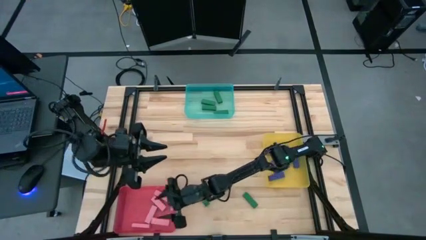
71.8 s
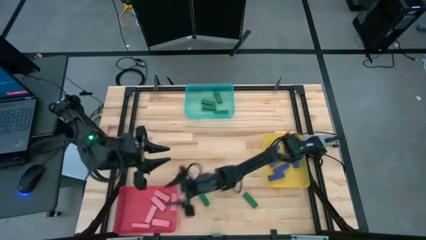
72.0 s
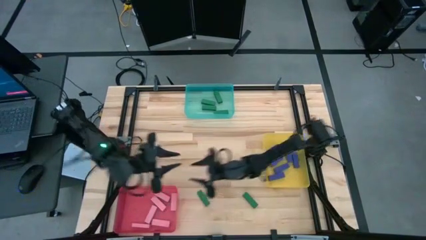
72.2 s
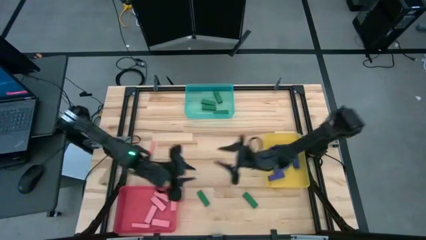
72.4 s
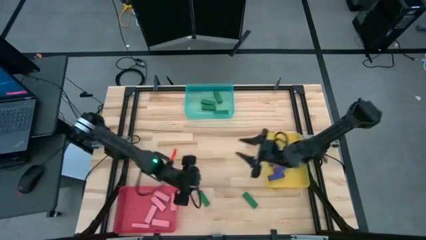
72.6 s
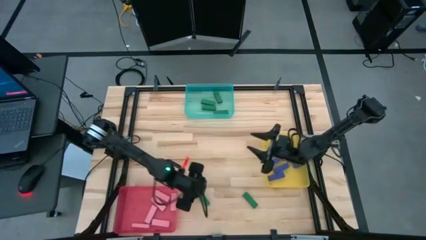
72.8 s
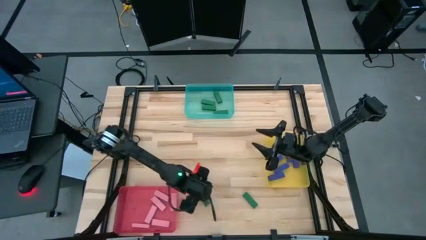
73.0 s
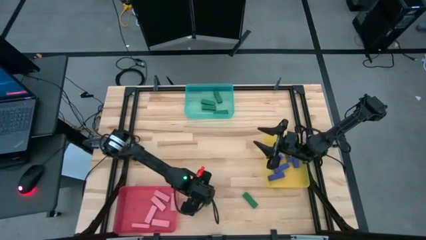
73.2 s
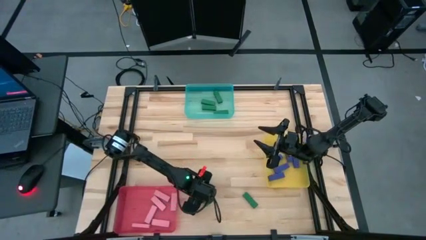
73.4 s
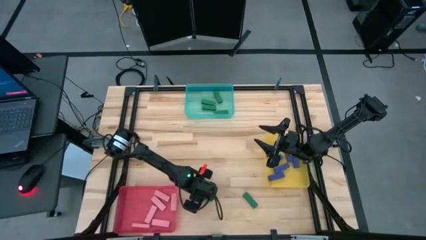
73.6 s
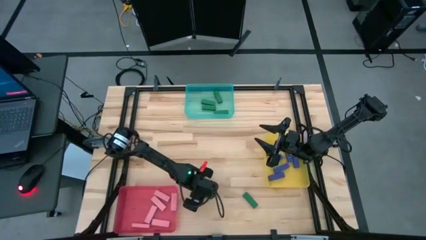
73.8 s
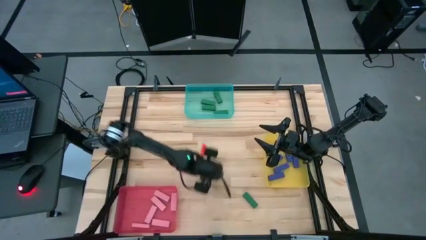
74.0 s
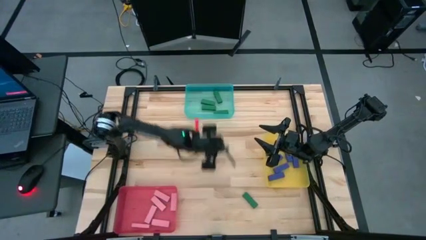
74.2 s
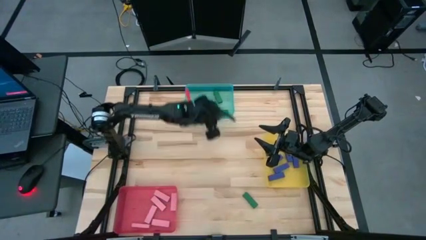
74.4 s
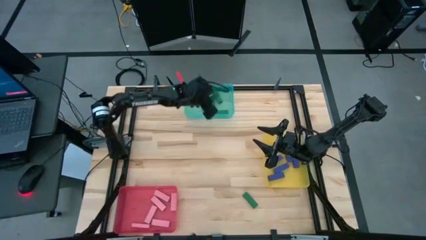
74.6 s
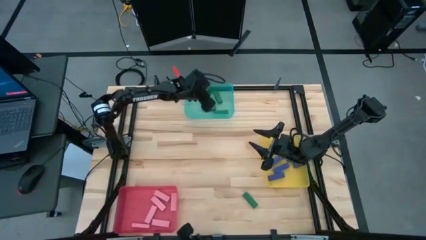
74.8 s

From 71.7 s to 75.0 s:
Task: Sort blocks
Put the green block into the blue bin

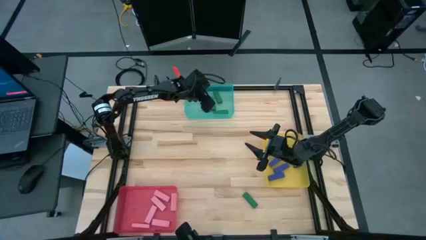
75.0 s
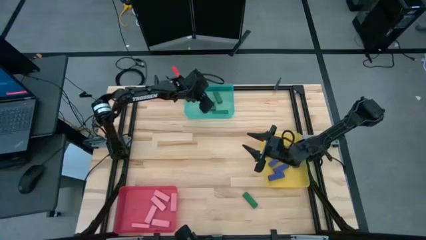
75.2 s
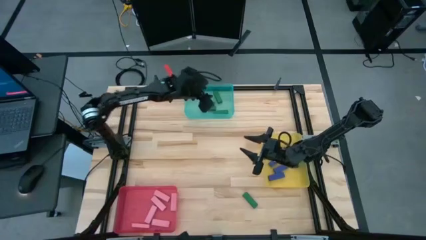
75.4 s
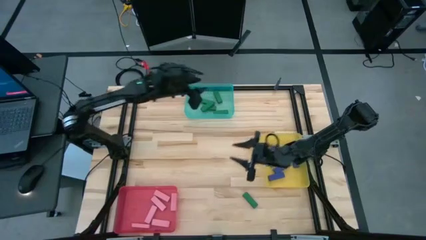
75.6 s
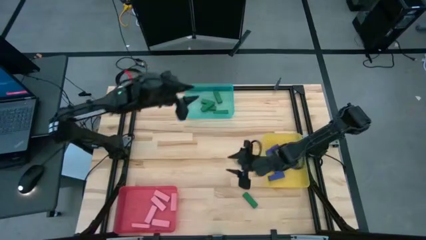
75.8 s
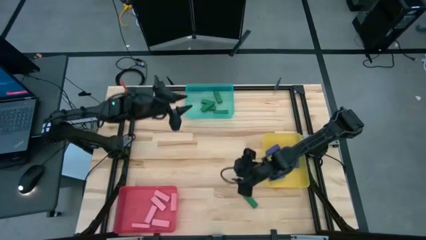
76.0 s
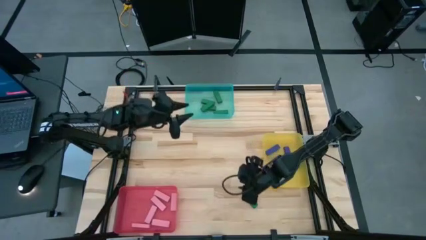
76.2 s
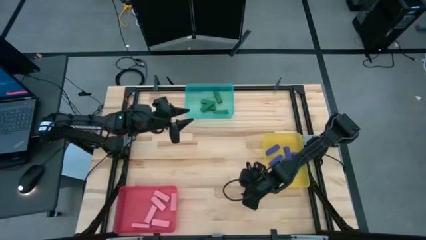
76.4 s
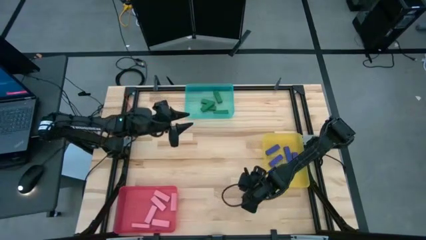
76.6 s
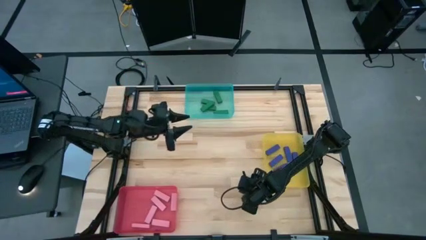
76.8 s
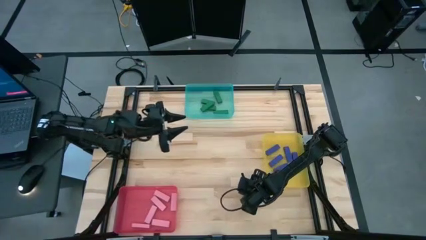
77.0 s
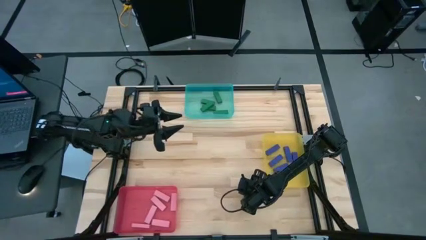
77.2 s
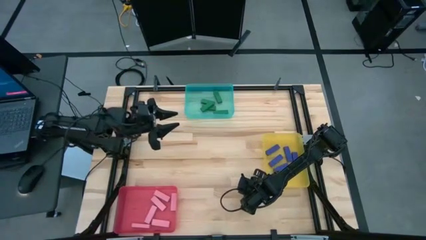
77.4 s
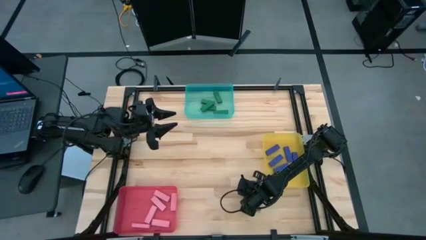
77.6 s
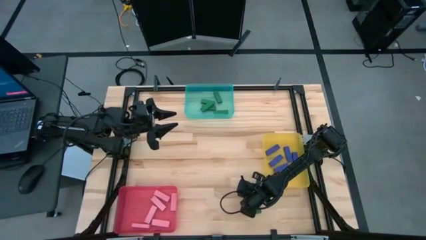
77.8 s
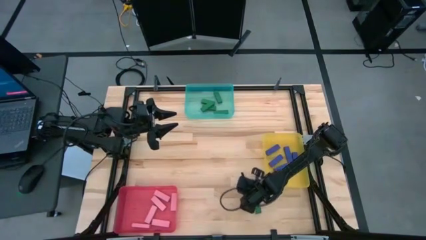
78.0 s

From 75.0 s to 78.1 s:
Put the green block into the blue bin

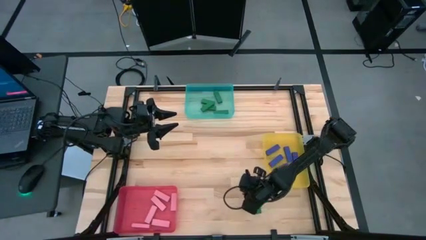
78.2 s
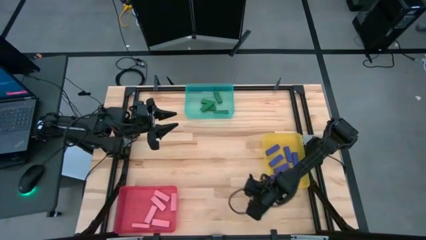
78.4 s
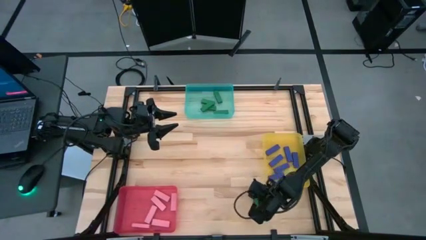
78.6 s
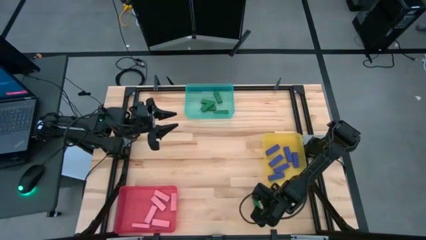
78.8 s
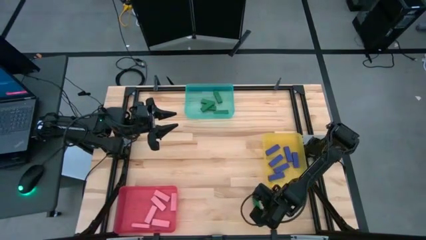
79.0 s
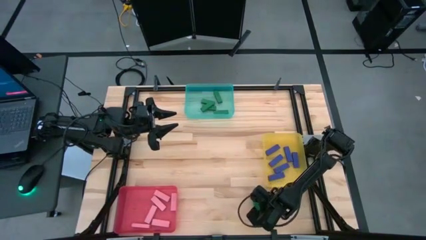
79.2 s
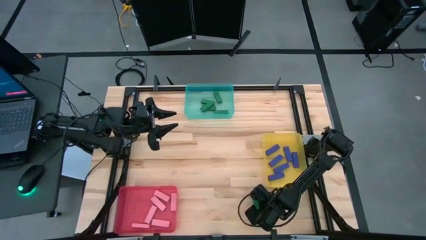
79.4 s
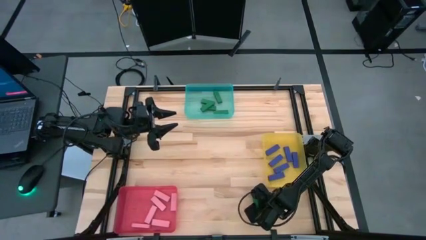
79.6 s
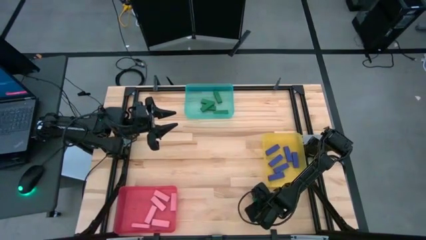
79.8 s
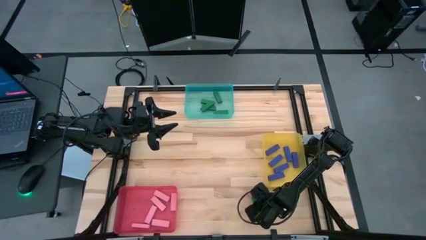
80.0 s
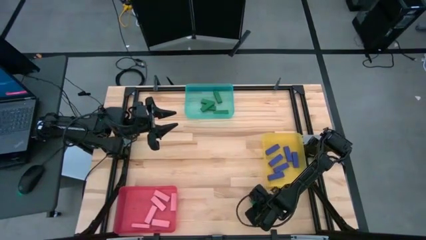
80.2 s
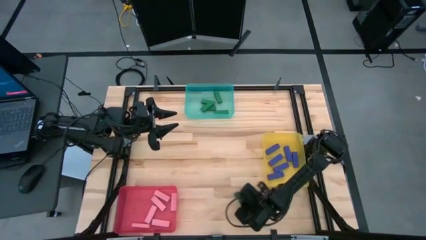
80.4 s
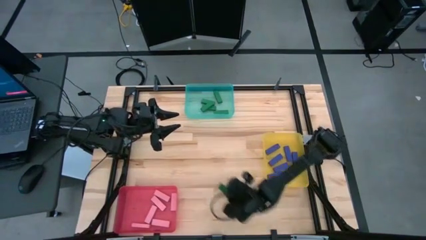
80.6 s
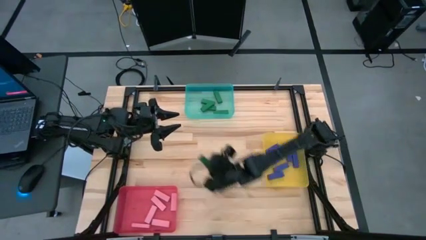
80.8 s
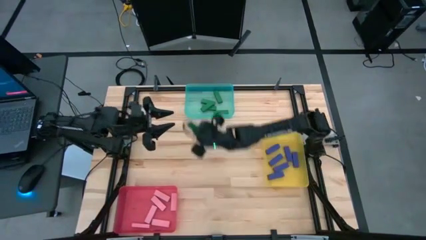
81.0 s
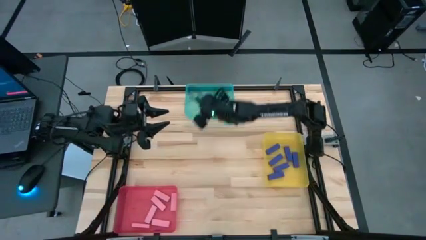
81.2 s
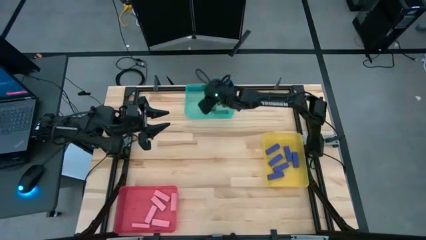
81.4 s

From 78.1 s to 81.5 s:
Put the green block into the blue bin

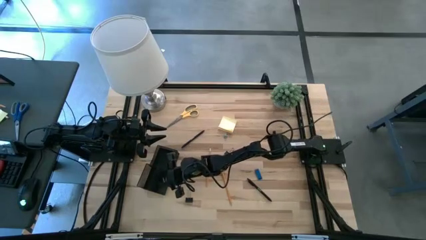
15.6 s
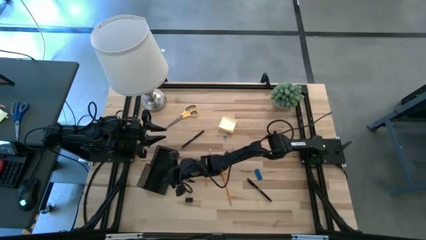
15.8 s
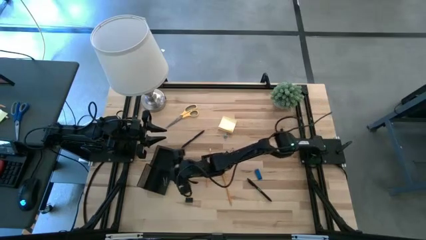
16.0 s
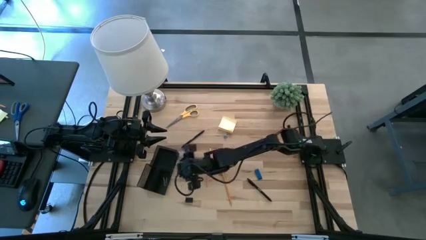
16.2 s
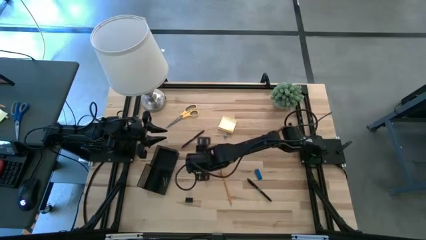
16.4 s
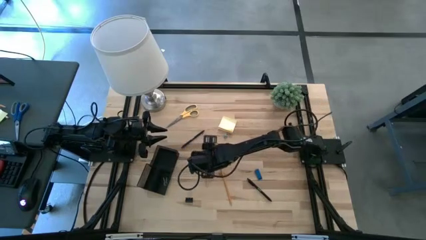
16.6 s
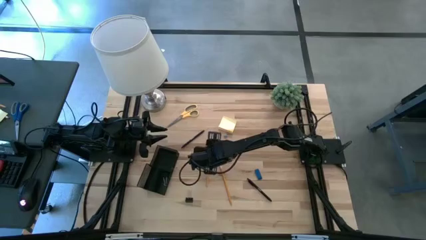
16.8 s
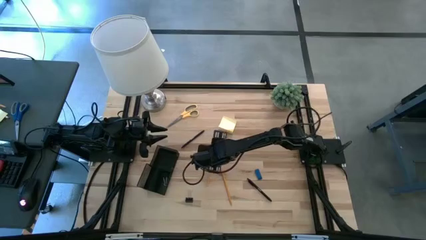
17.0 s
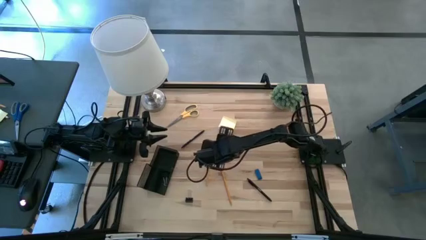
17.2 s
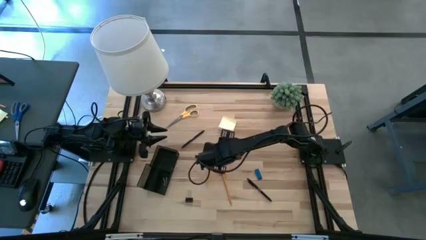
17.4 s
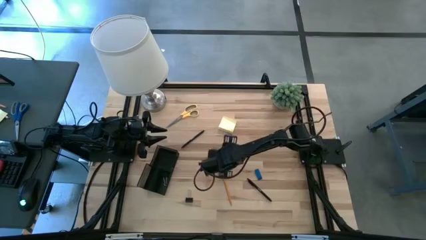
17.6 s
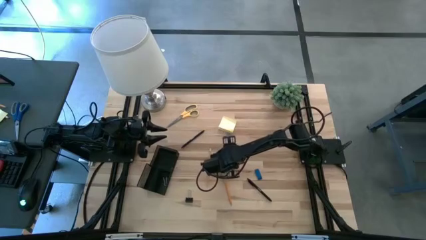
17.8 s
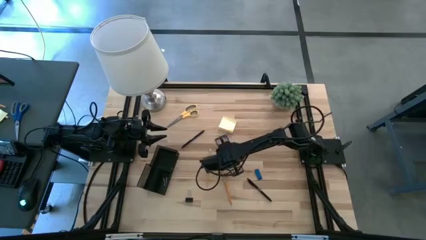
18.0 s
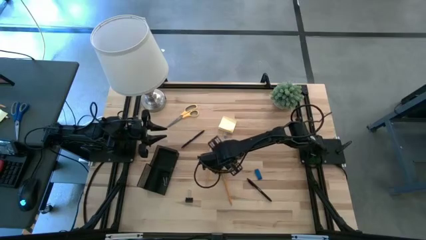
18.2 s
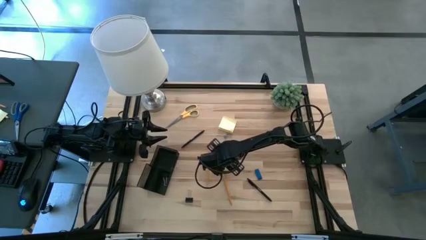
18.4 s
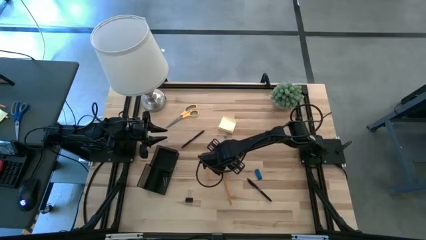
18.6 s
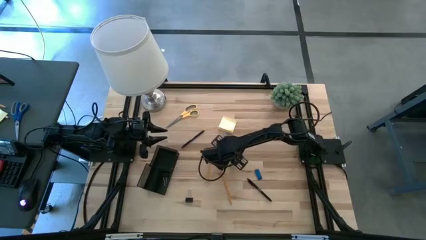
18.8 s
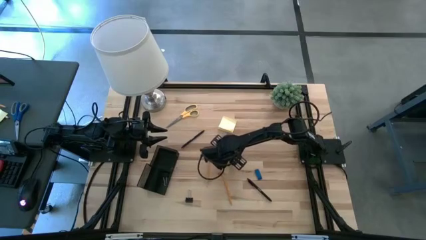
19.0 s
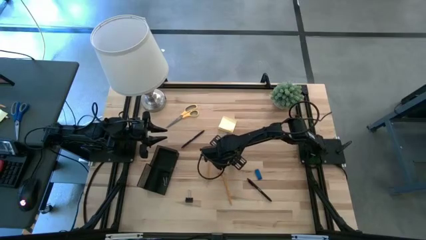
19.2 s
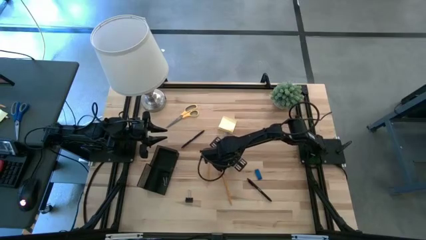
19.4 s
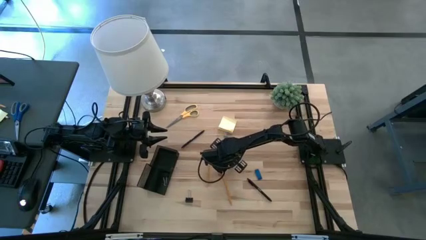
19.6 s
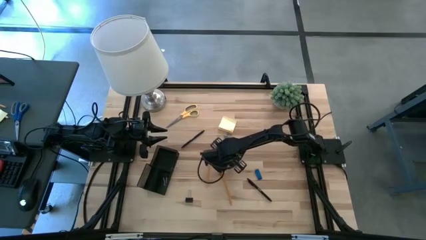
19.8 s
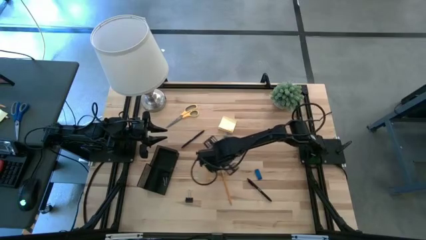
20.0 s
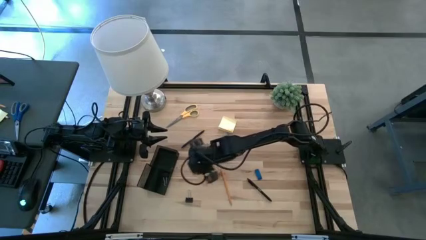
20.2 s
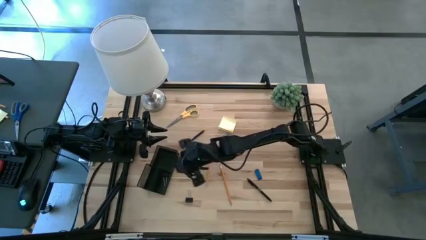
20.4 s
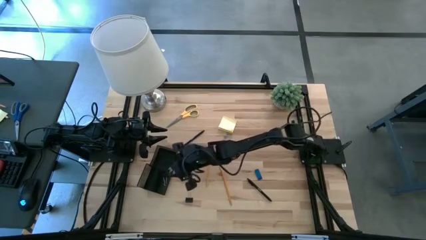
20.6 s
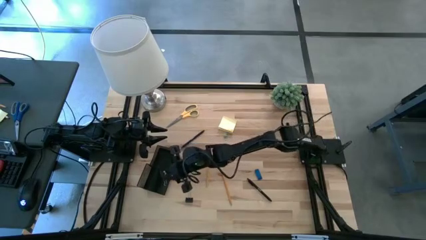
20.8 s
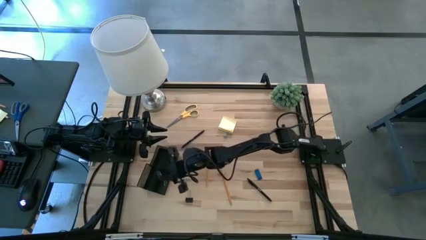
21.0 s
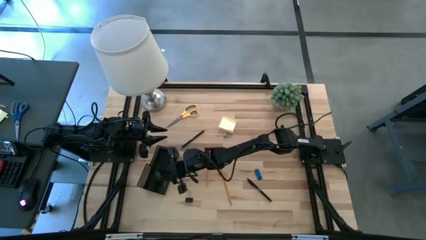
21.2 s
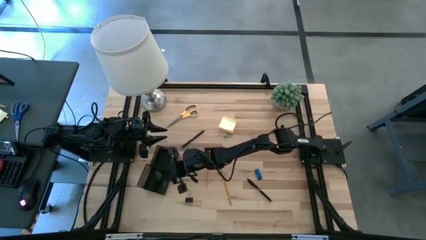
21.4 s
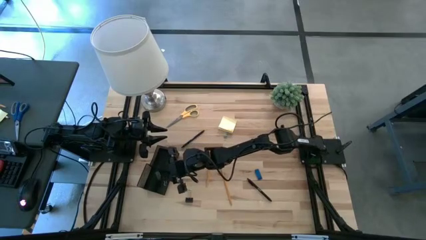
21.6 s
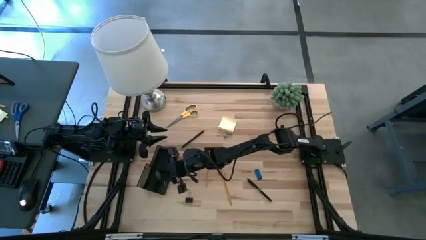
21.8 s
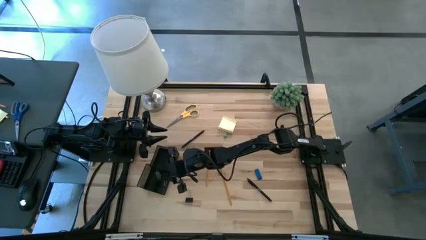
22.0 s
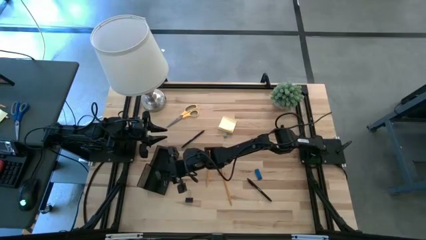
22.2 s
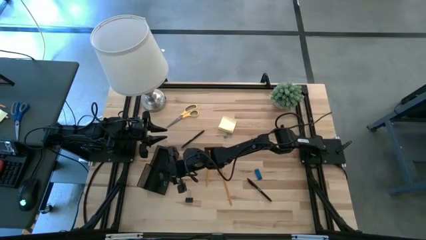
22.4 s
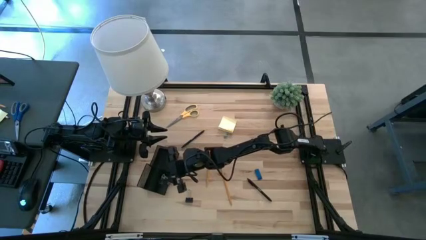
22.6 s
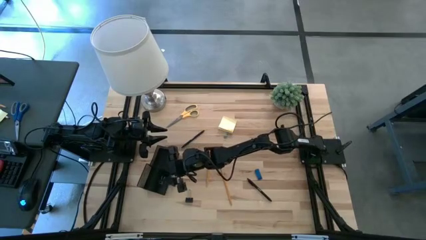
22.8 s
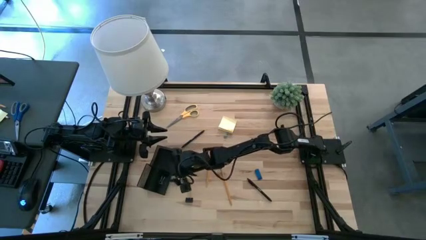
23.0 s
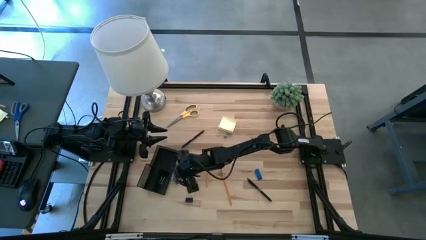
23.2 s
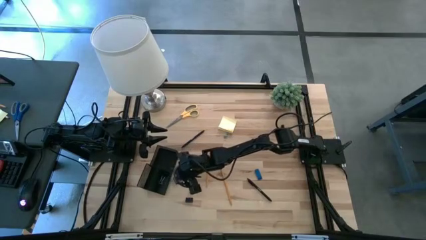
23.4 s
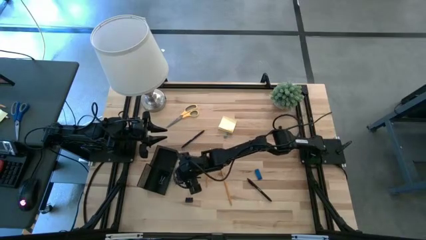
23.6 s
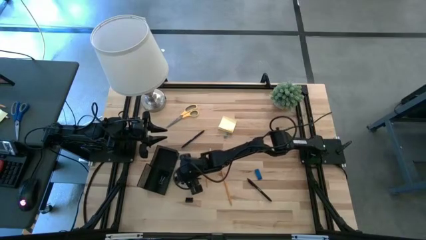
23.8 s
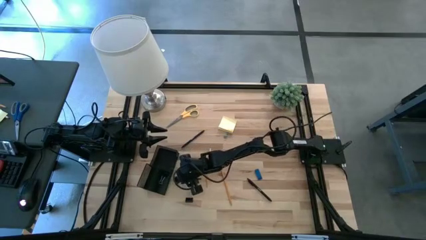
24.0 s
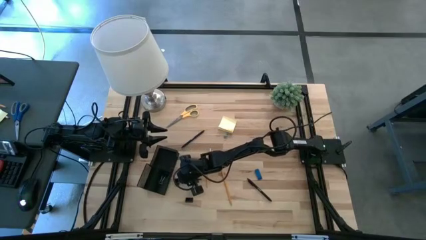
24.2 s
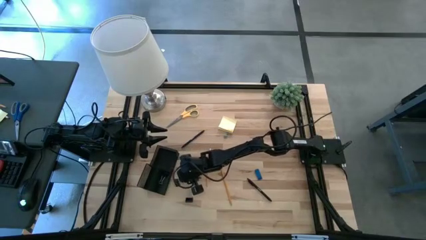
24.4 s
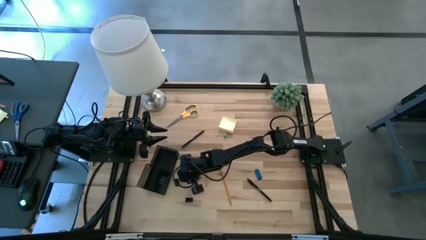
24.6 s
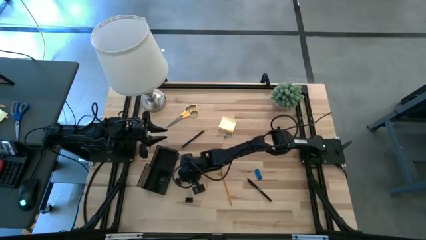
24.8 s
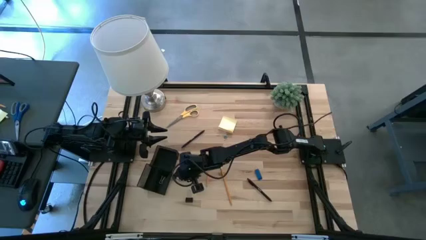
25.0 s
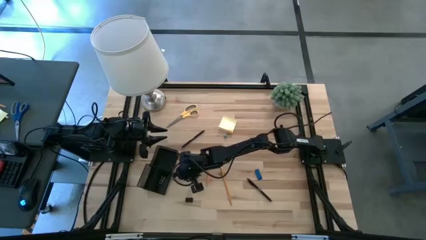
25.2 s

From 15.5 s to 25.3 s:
Task: Pick and place office supplies into organizer
Put the top black binder clip into the black desk organizer
